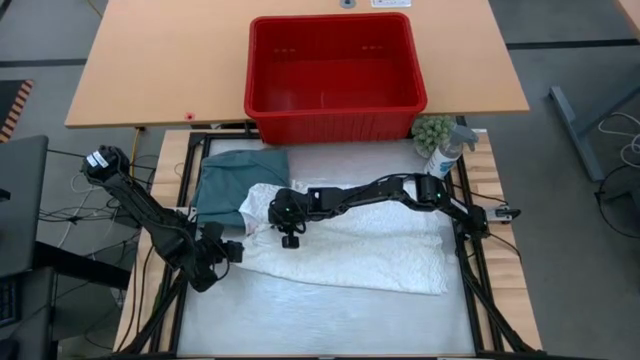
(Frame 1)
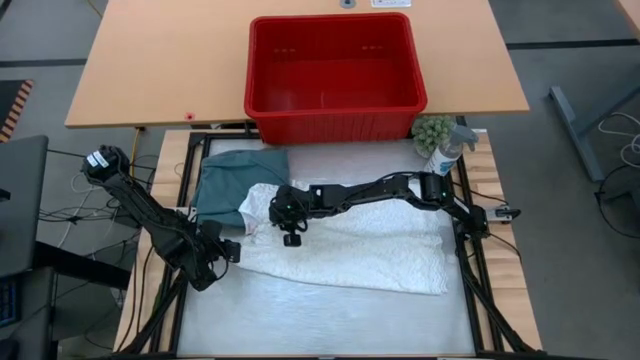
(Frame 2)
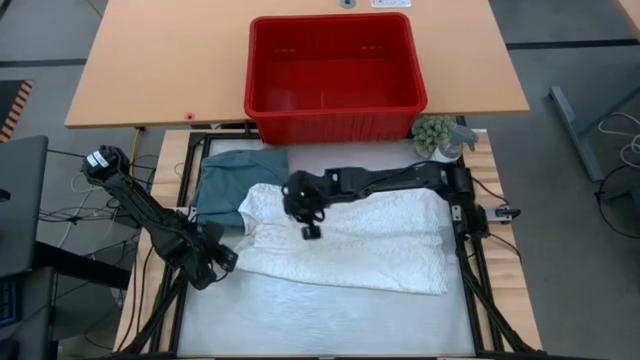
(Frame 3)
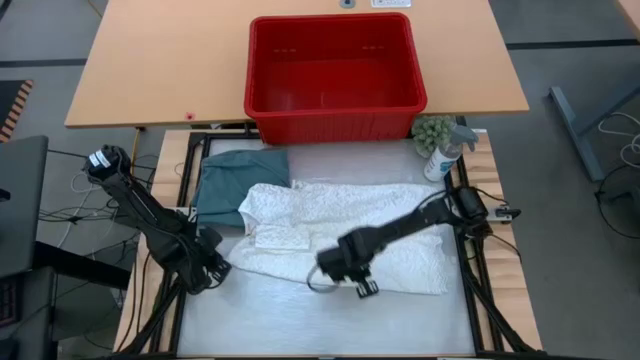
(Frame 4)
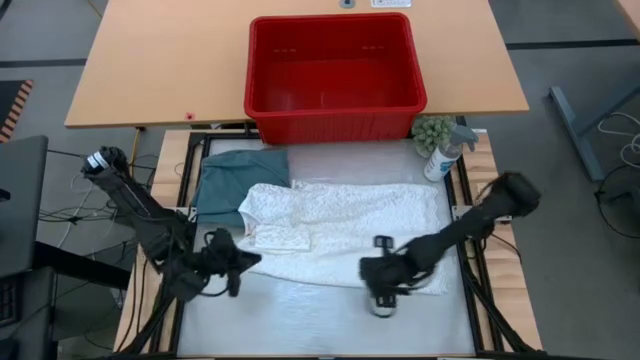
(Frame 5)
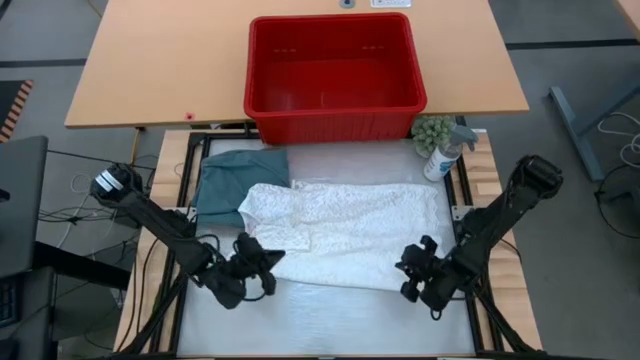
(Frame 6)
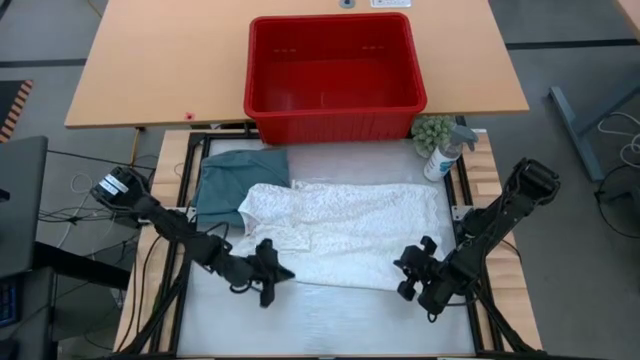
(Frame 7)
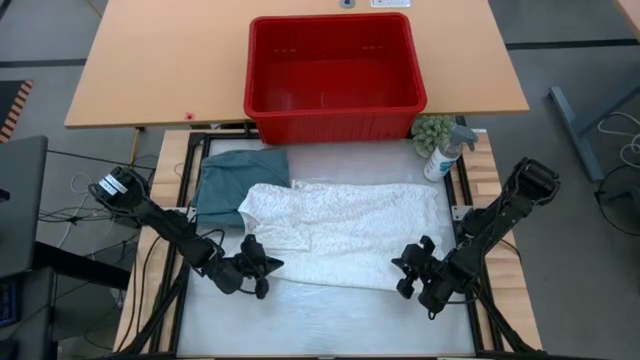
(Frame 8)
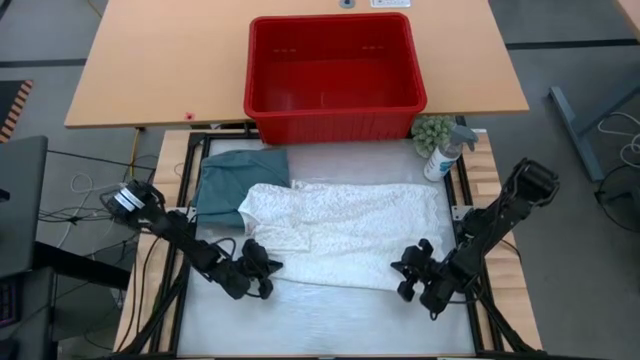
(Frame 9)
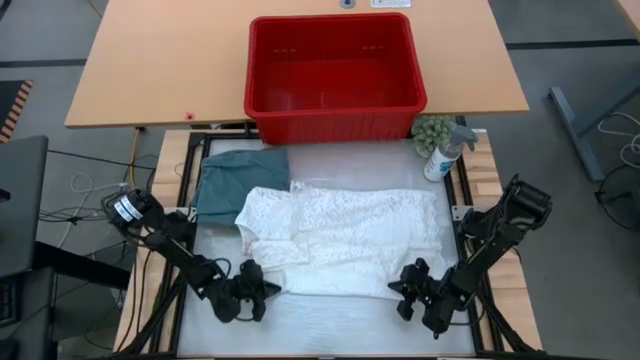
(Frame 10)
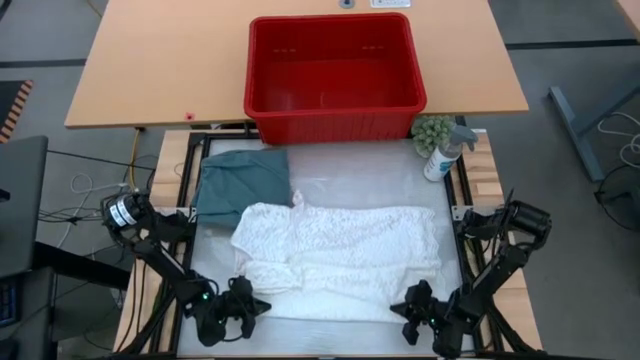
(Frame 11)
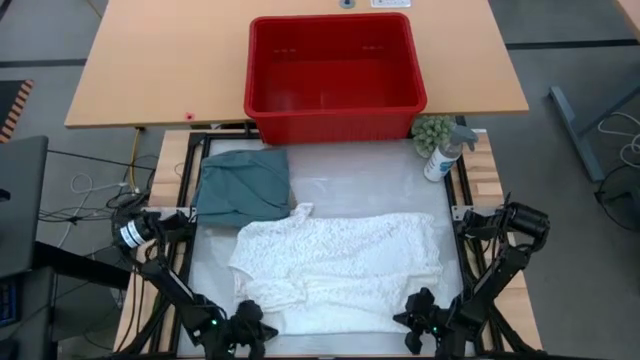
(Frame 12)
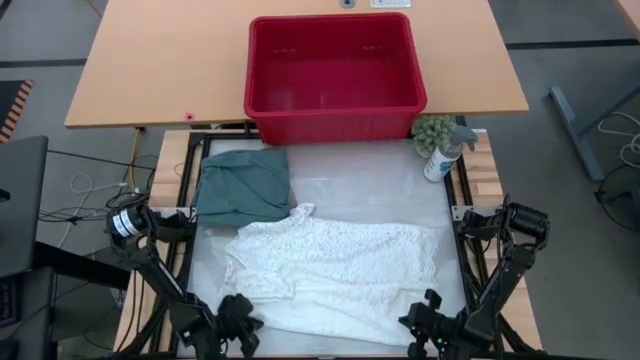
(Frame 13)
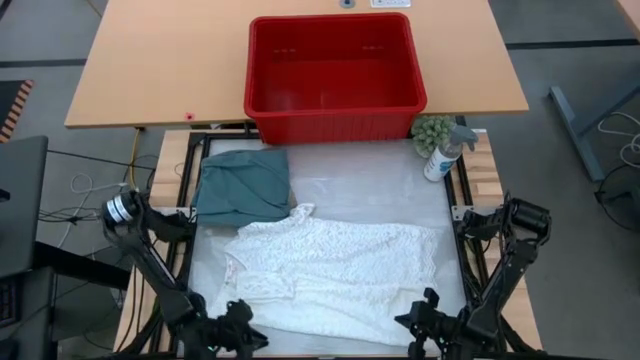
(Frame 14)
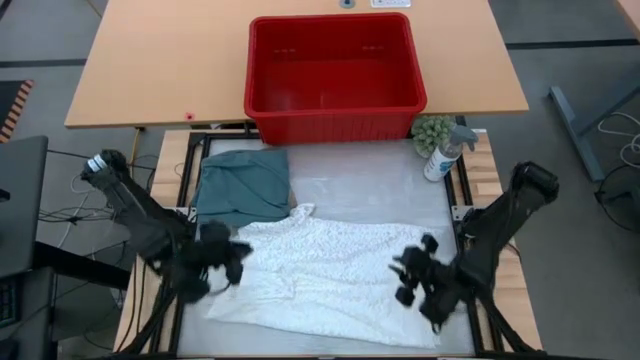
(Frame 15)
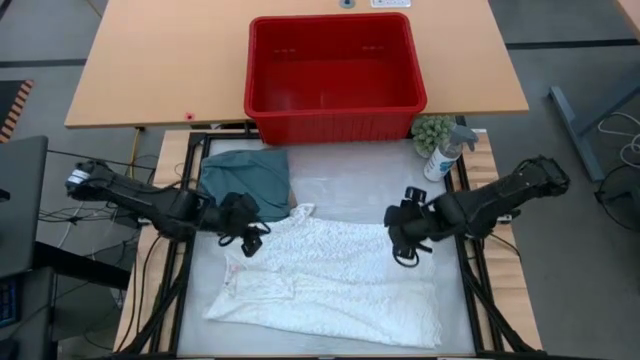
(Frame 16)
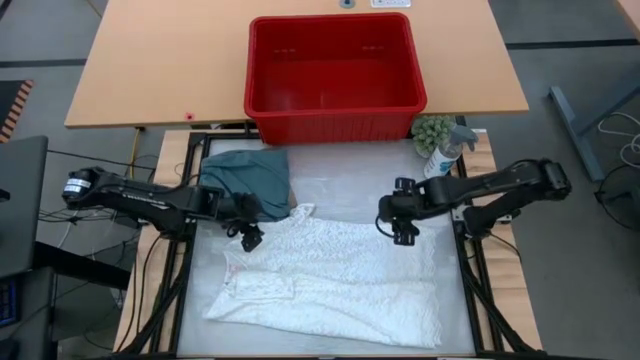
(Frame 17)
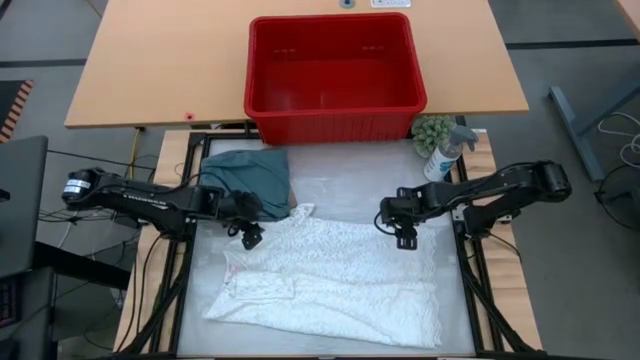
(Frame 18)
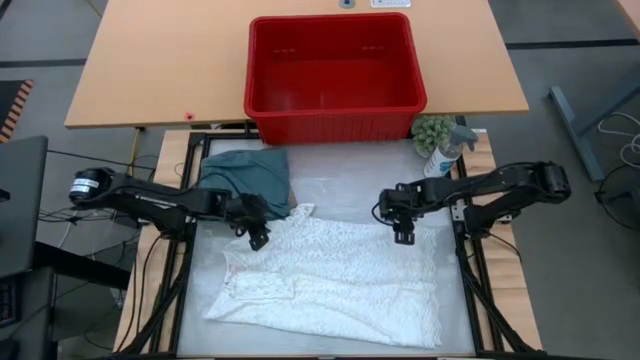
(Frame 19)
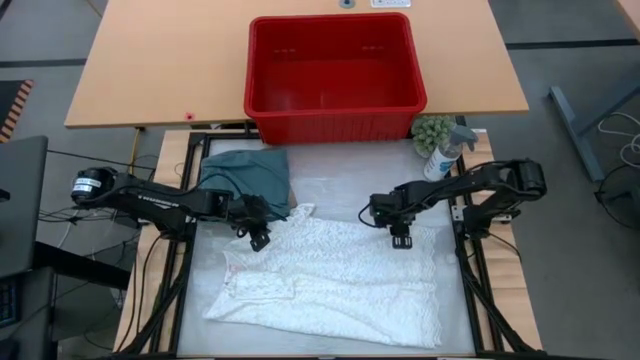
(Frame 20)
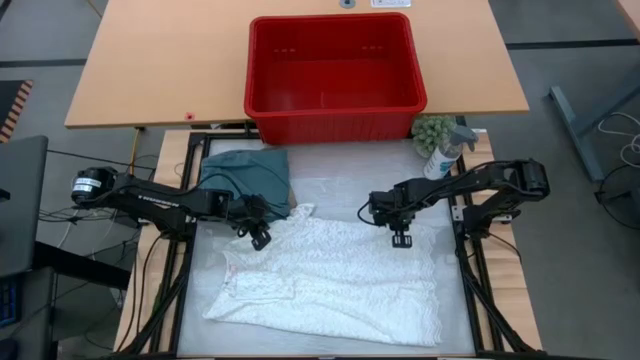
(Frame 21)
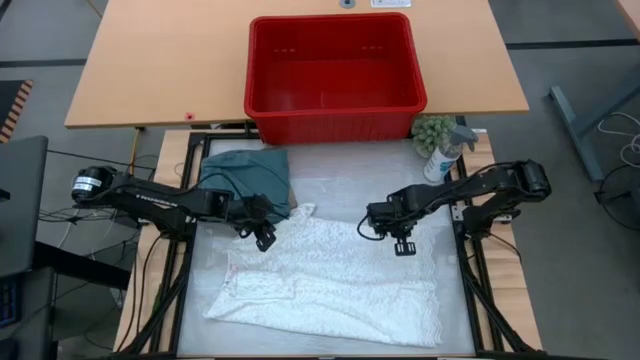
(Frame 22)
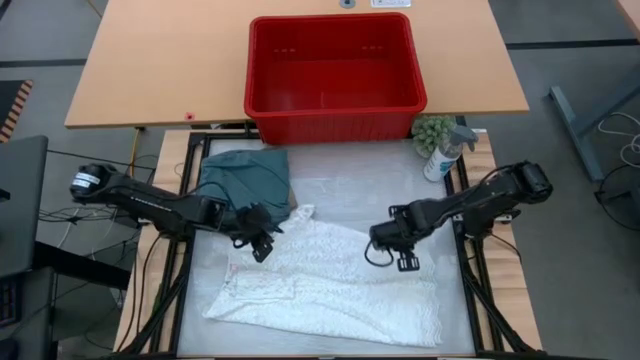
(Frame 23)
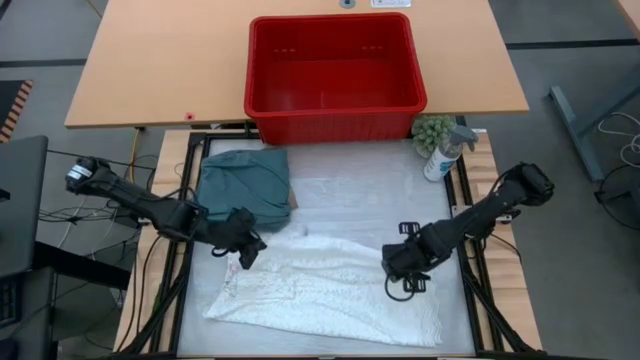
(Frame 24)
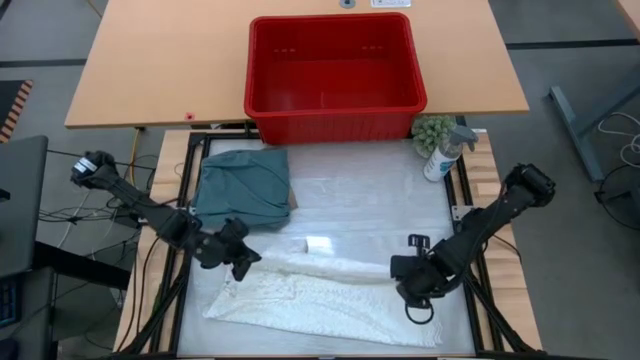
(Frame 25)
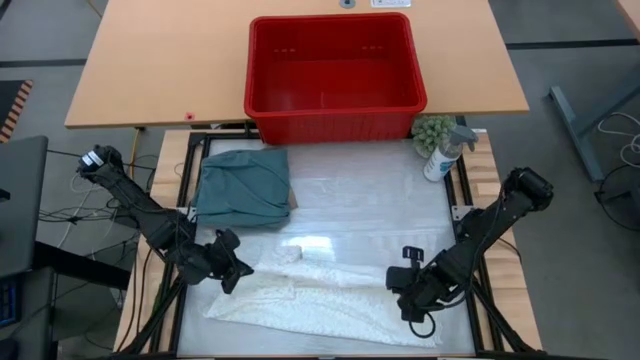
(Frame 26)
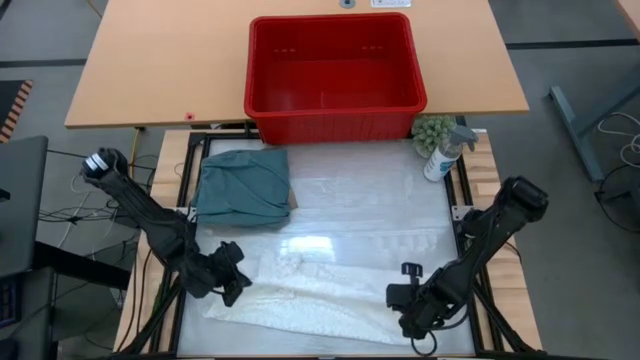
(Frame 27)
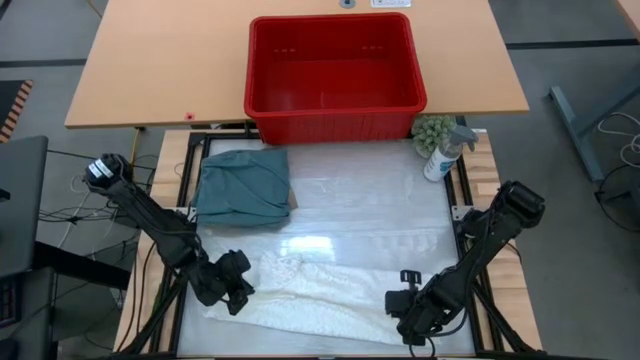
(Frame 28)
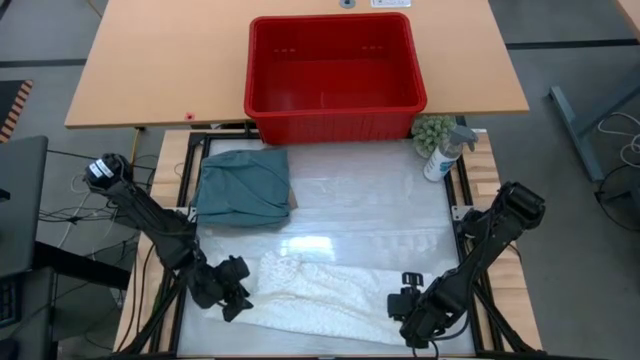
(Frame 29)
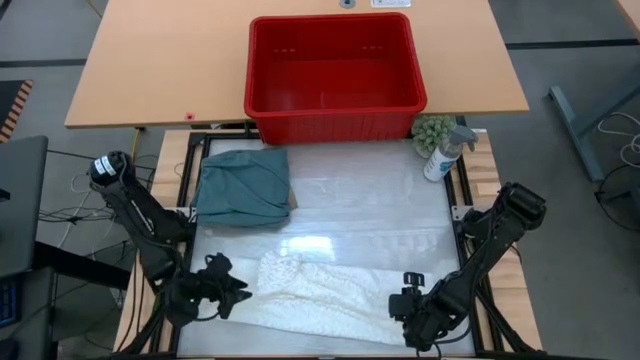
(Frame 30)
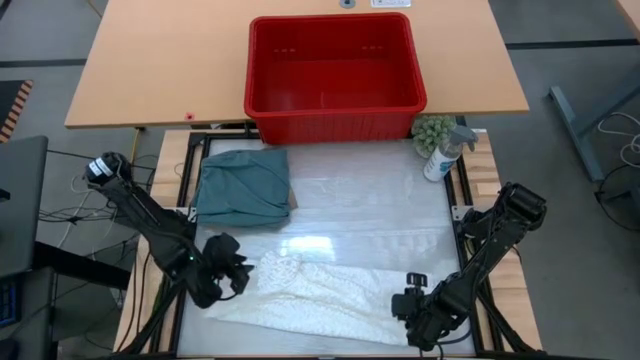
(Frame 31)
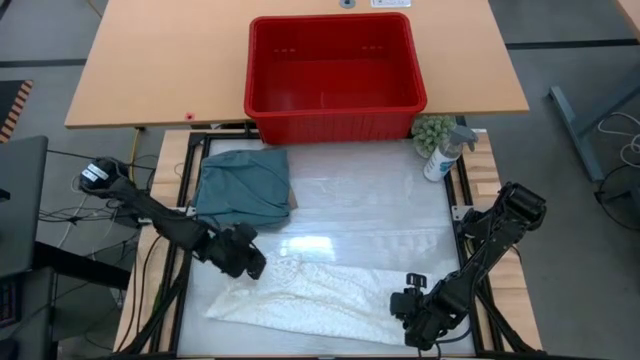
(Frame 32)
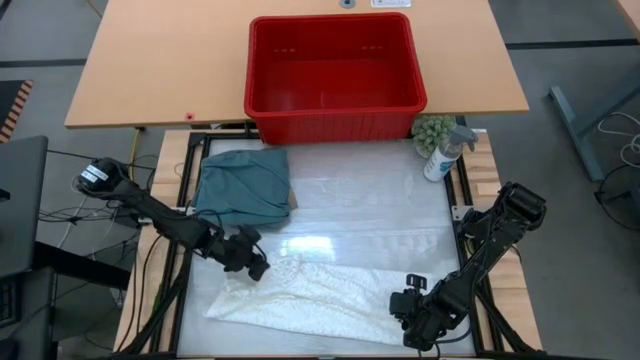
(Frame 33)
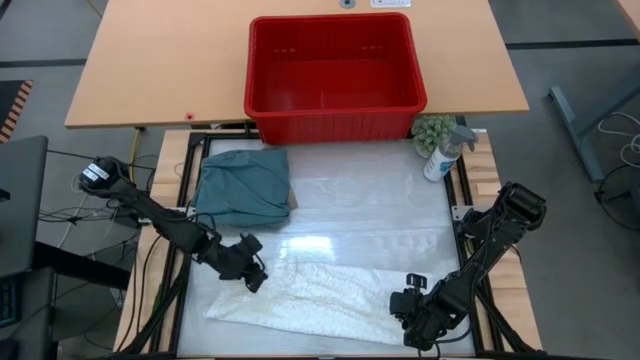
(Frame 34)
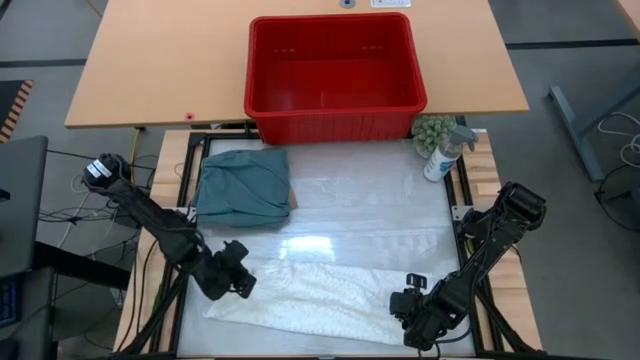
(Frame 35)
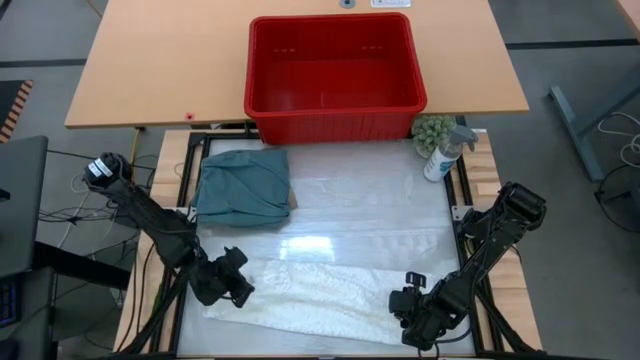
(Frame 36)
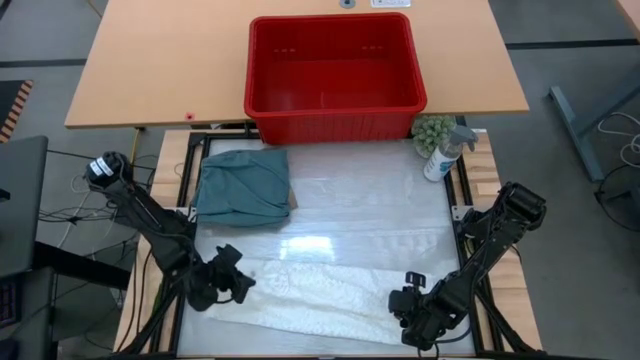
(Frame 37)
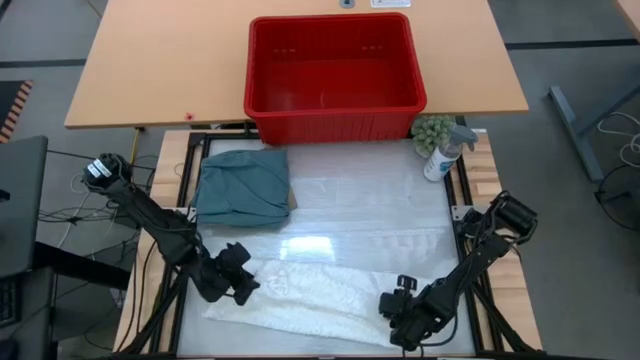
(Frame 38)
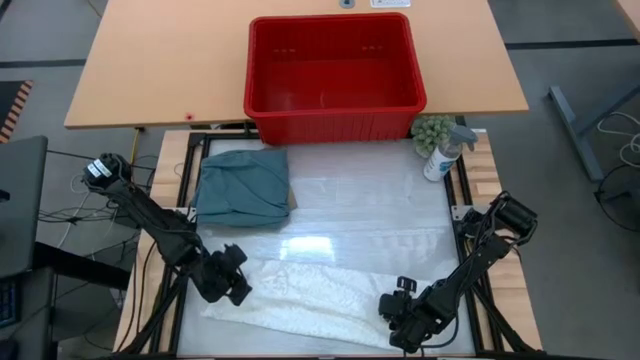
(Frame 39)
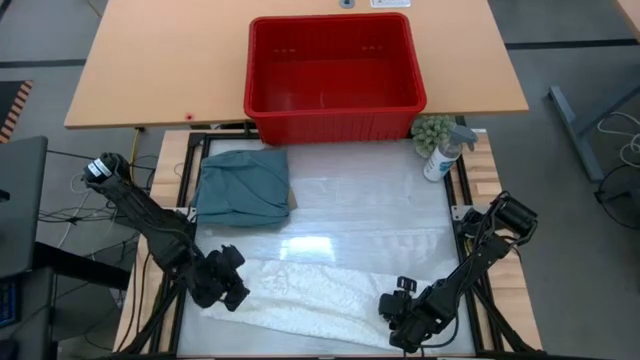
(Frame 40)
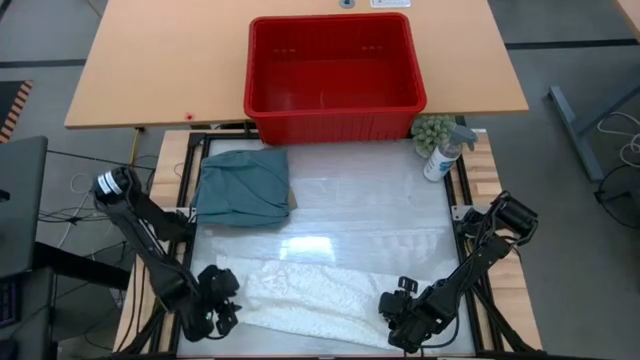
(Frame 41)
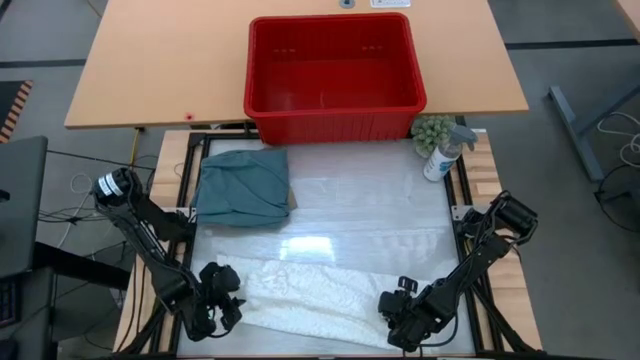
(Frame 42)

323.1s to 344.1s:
Task: Fold Laundry from Bin
Fold the white shirt in the red bin
